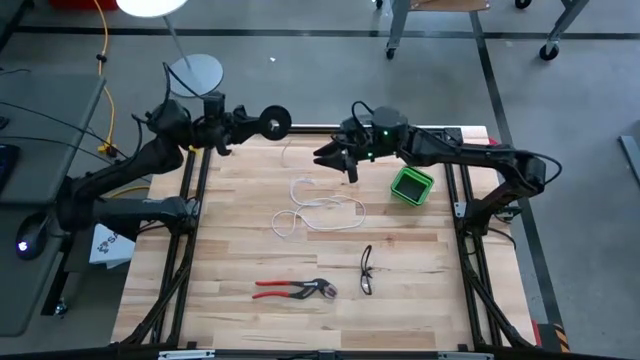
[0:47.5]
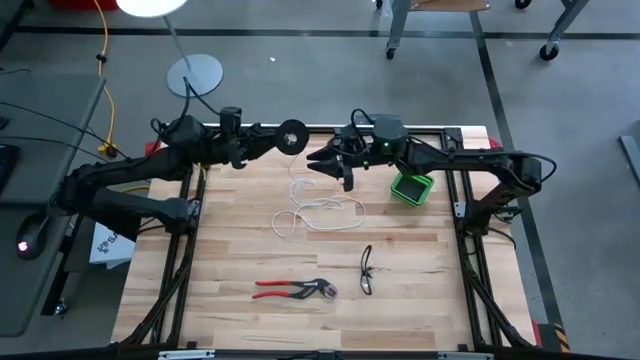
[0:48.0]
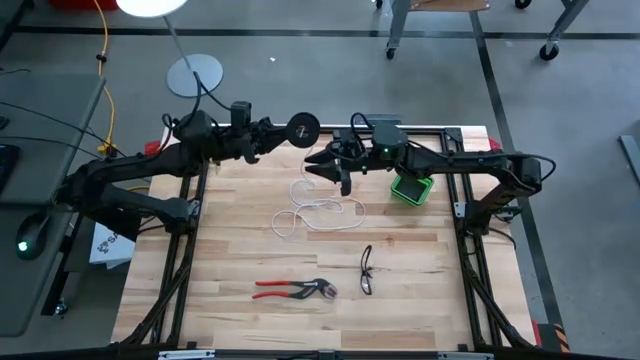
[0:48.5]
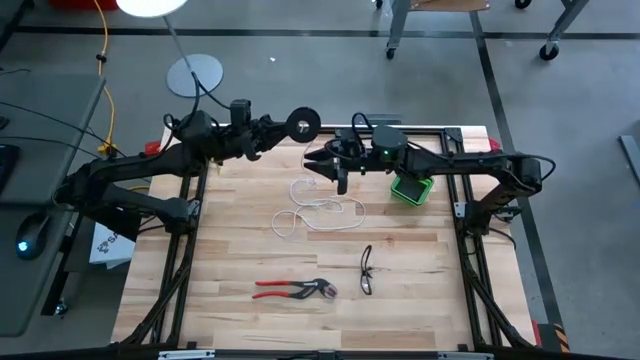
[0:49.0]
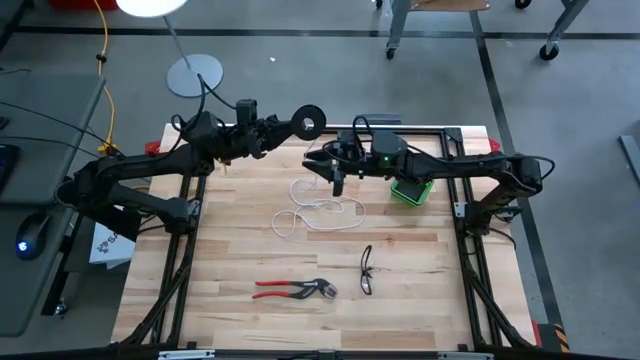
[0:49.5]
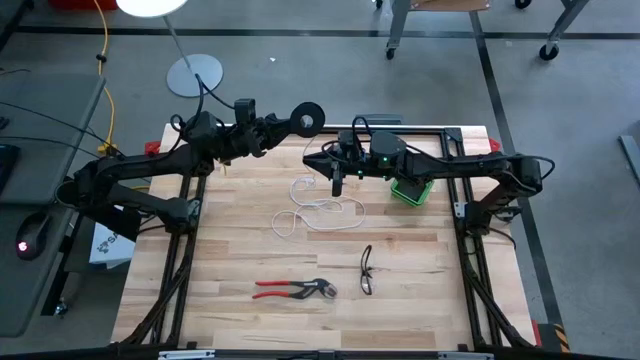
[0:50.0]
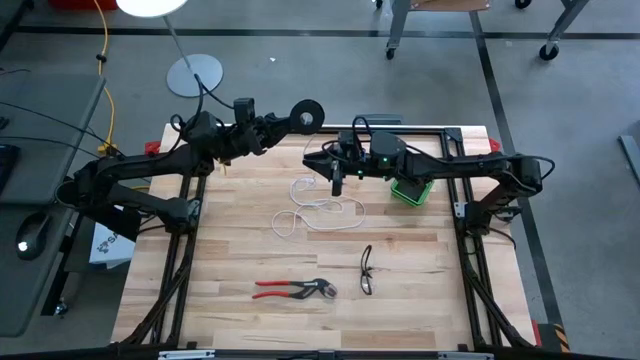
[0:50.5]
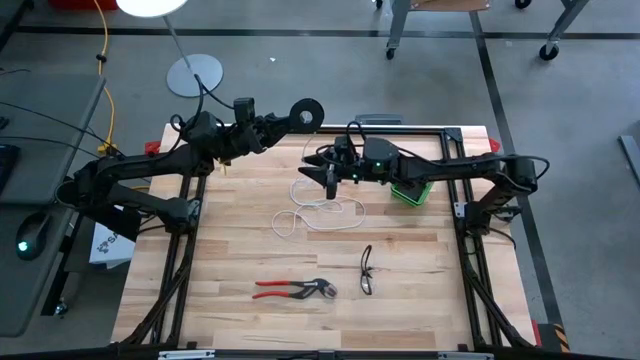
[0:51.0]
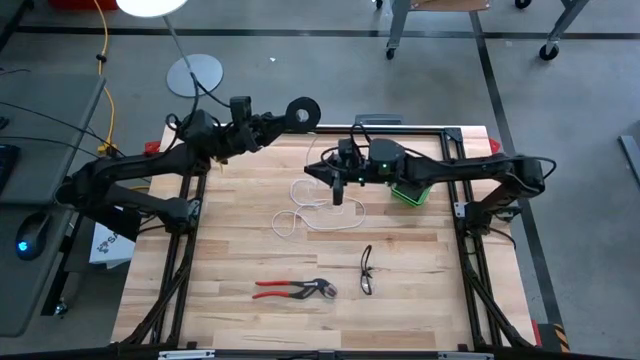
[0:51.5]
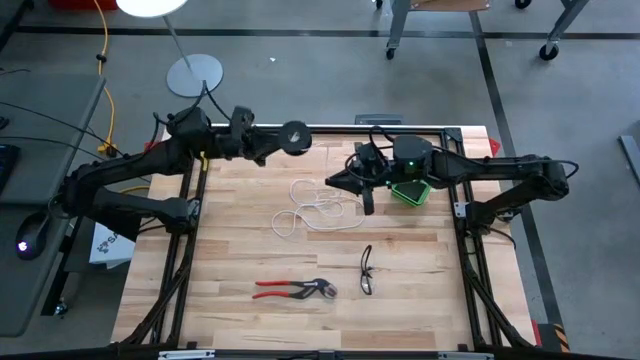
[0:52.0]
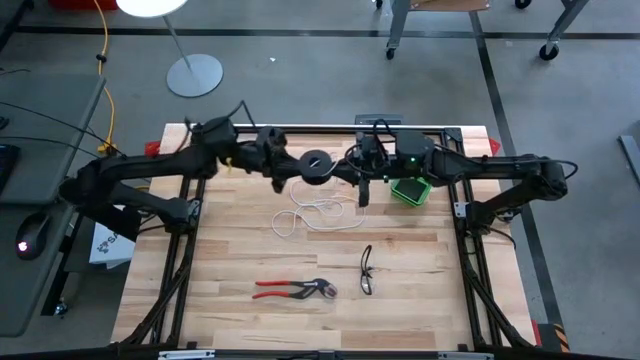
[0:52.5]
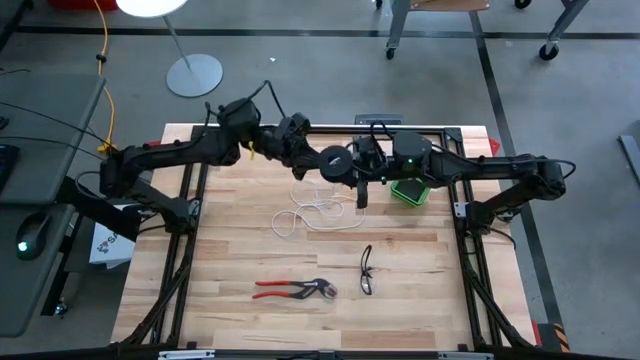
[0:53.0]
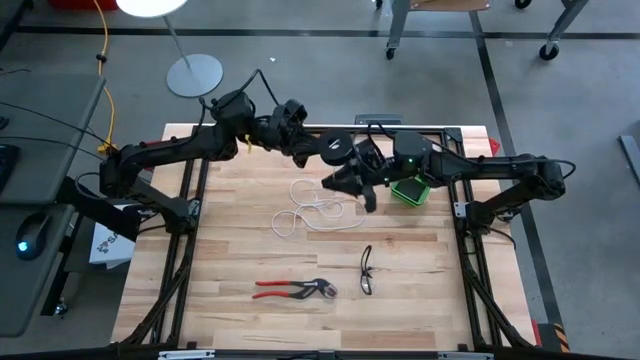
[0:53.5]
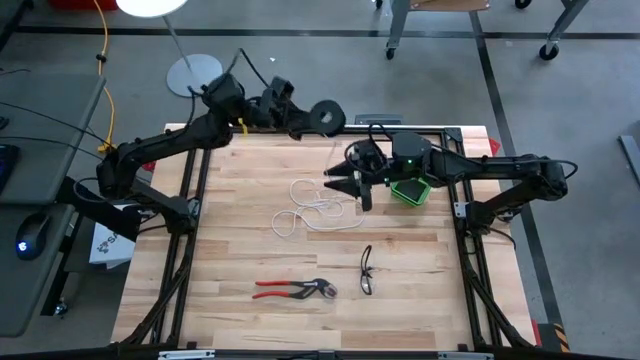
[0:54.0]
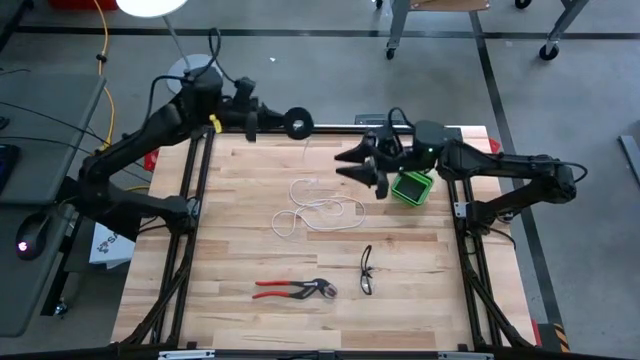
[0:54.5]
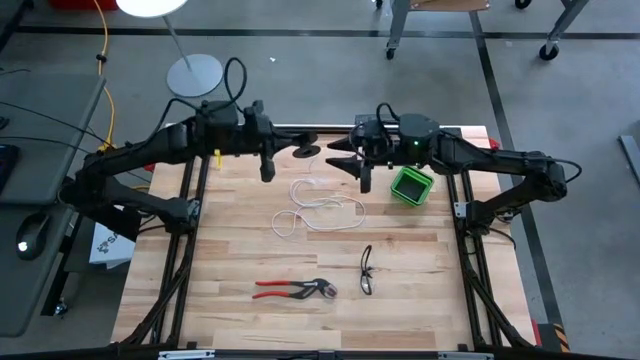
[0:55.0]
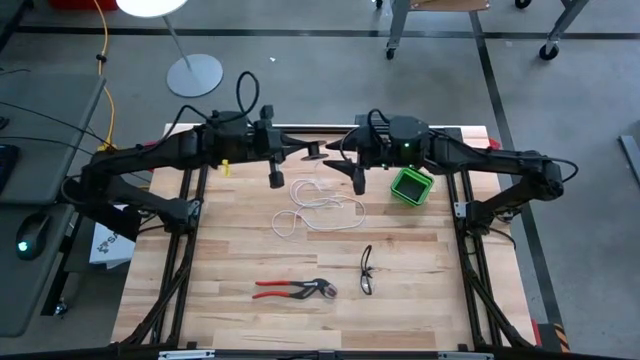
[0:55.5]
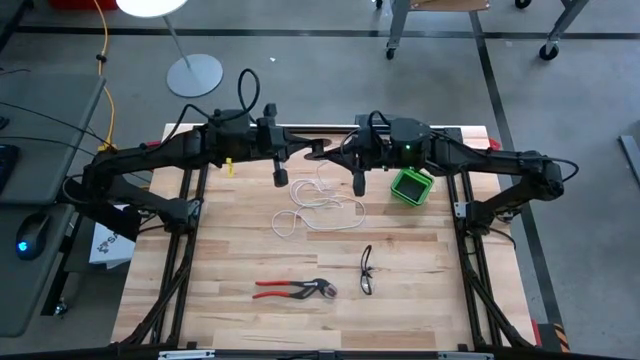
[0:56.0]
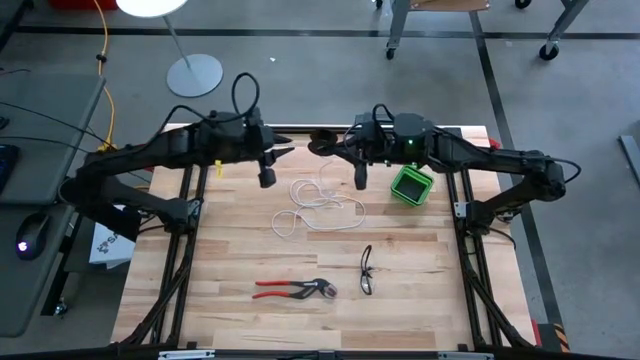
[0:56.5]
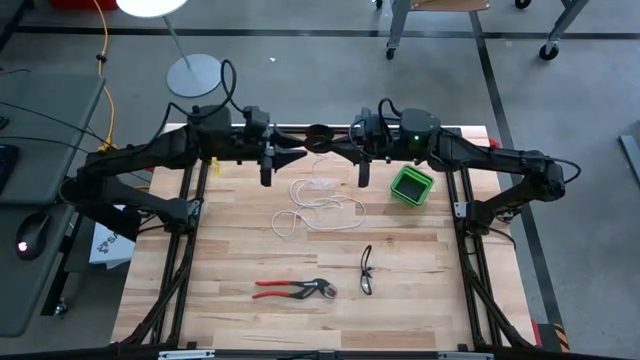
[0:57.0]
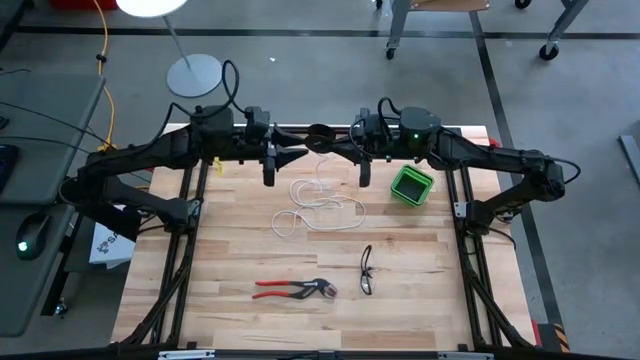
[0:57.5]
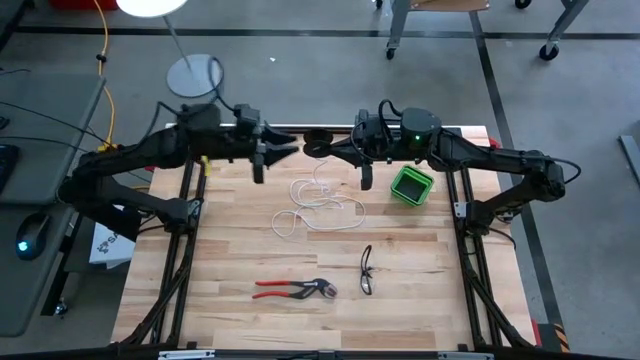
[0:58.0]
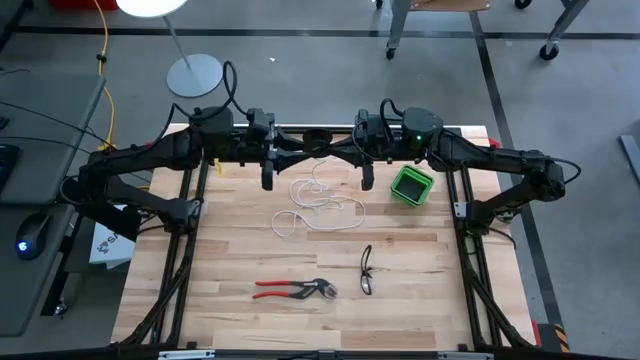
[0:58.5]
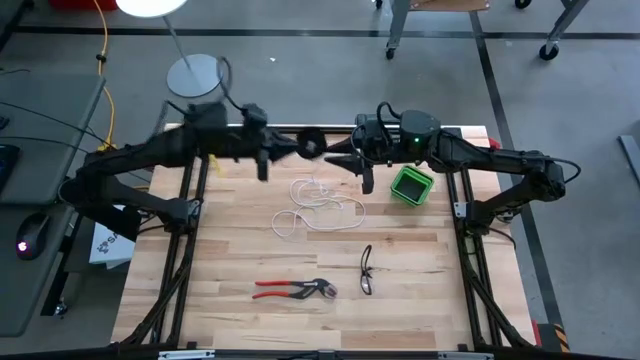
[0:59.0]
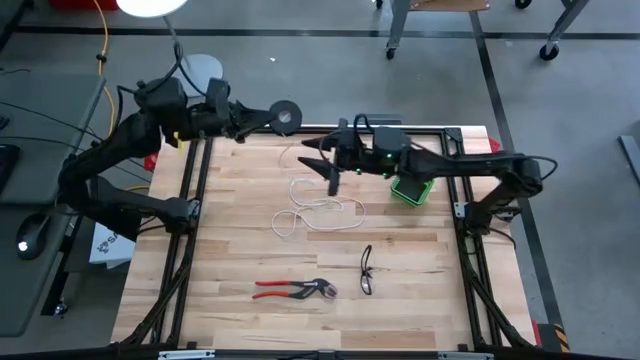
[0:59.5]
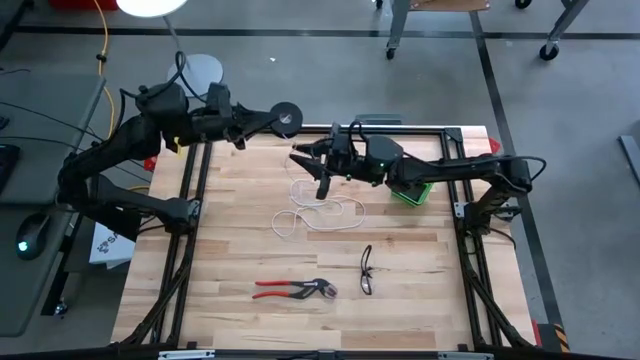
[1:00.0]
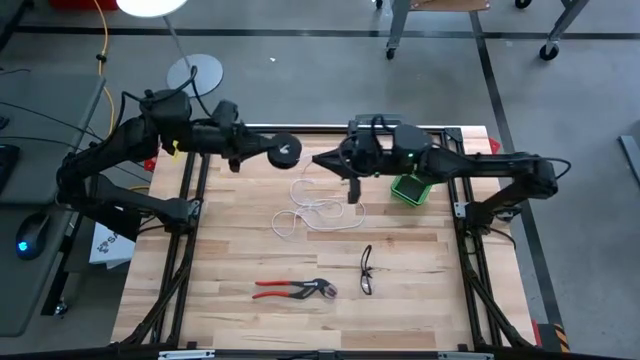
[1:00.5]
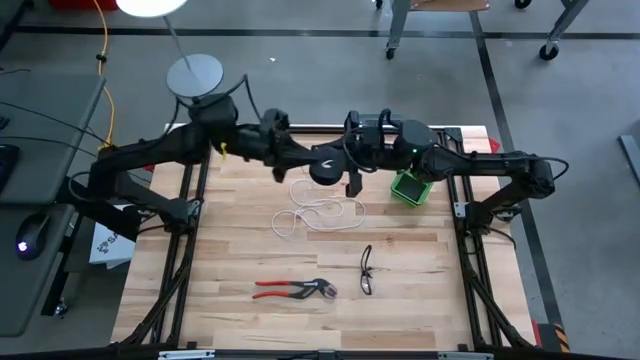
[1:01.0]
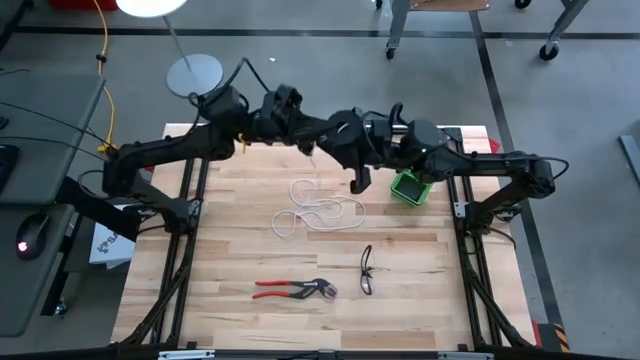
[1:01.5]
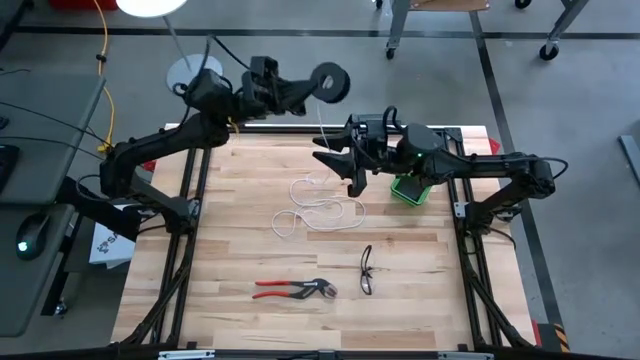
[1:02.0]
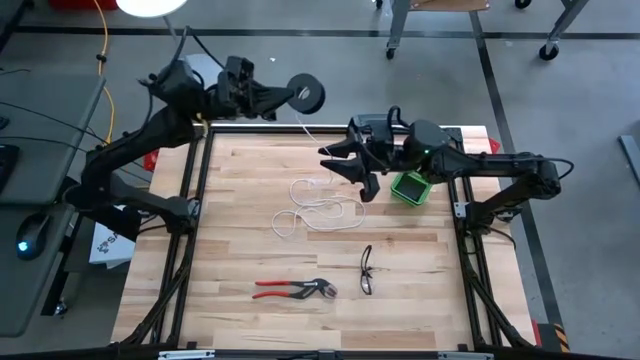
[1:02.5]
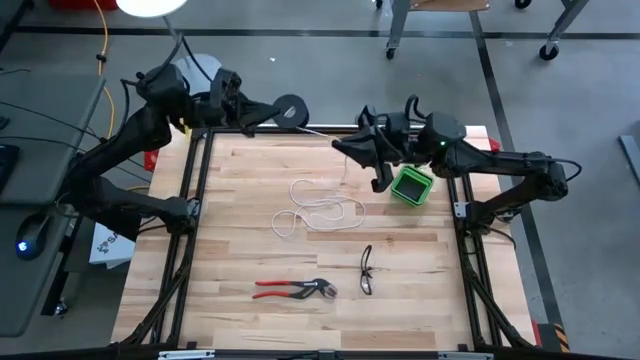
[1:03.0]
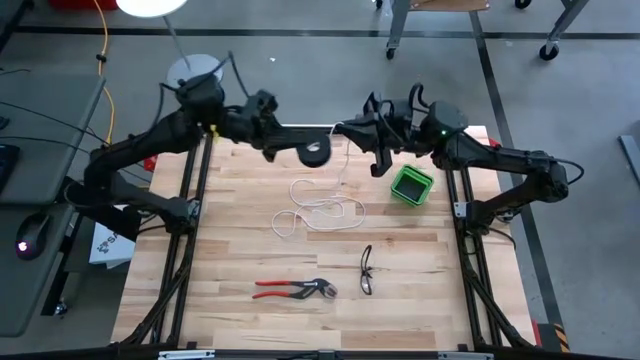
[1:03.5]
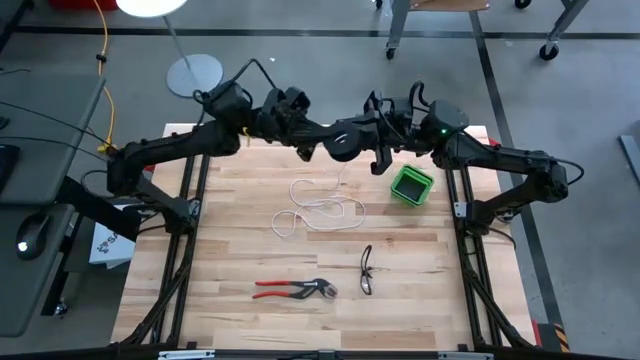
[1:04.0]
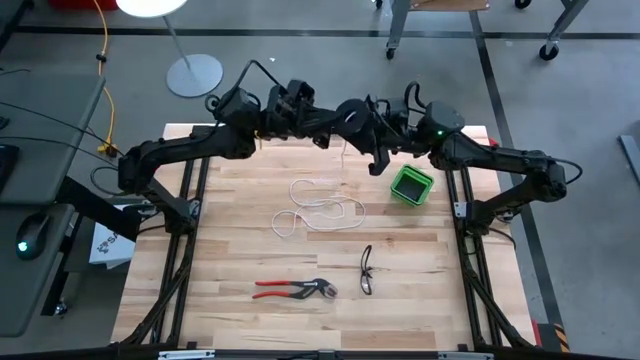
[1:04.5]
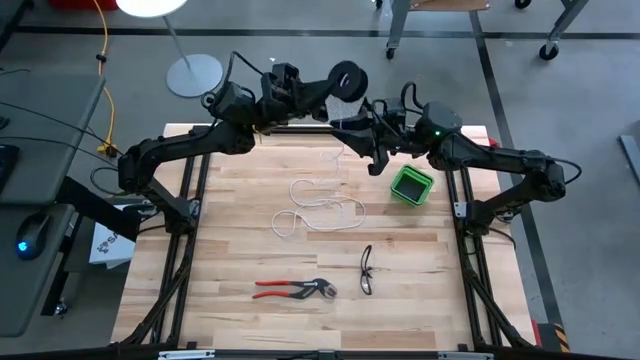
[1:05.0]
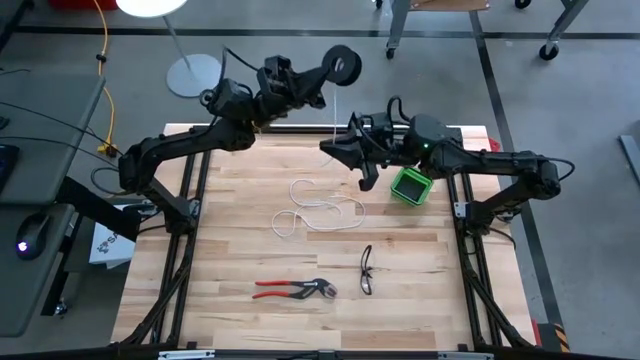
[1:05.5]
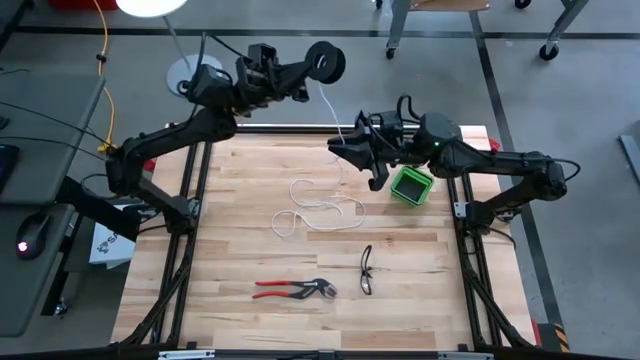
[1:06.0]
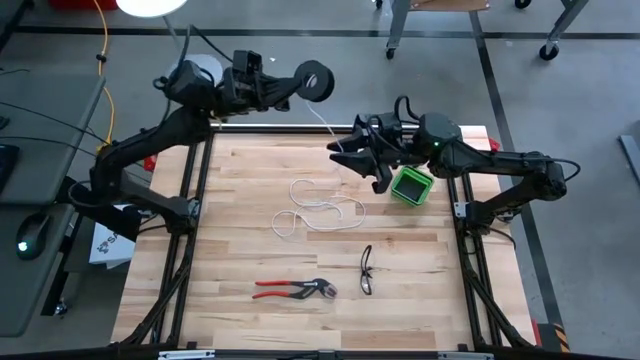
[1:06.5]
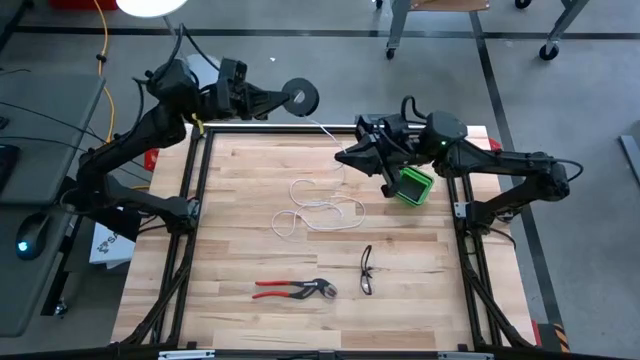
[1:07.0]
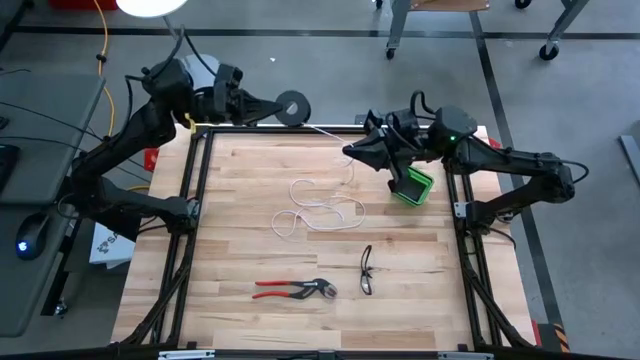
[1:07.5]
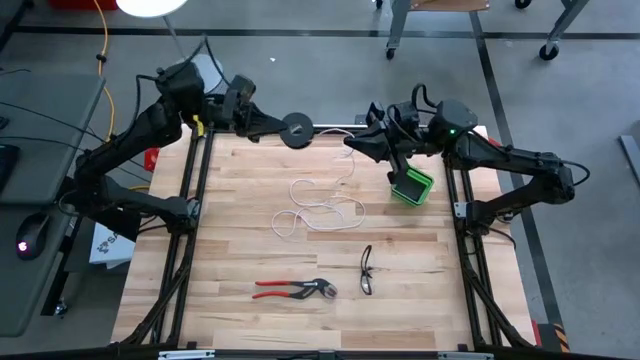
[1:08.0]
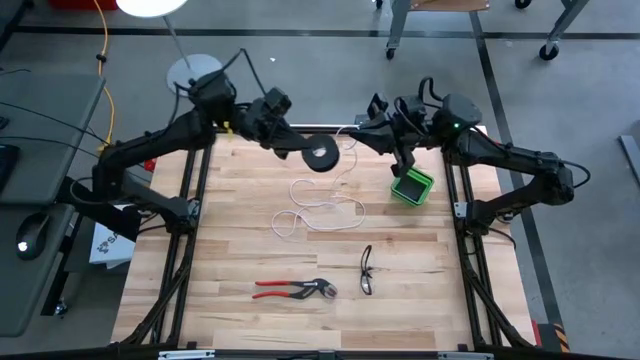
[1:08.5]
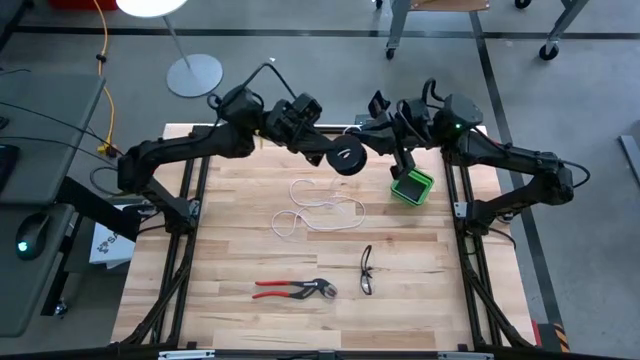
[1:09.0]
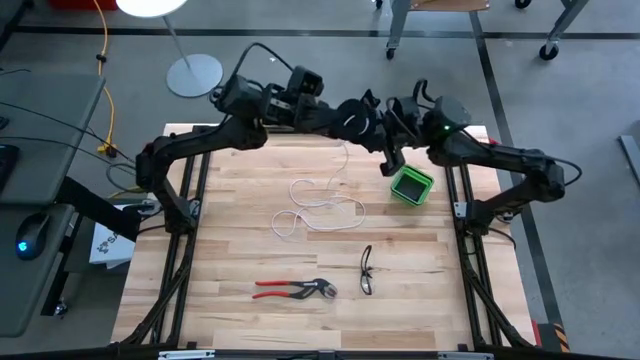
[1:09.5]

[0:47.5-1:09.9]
Task: Coil cords
Coil the wire into the spool
